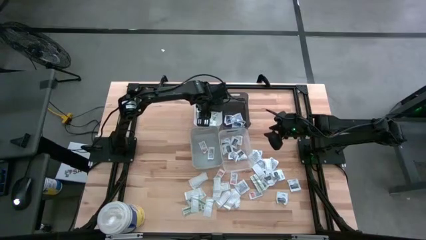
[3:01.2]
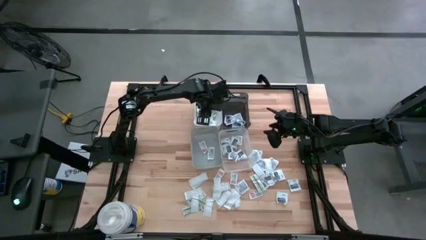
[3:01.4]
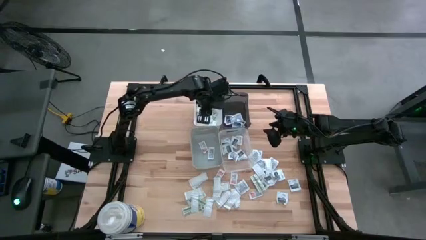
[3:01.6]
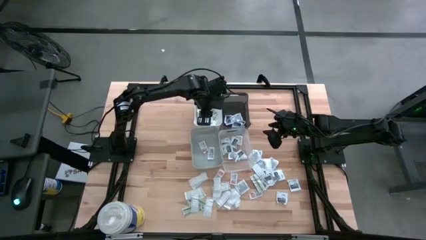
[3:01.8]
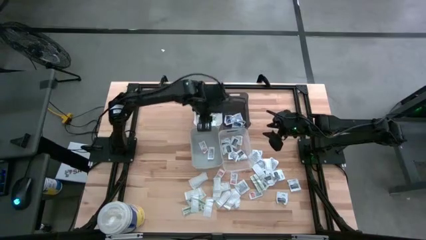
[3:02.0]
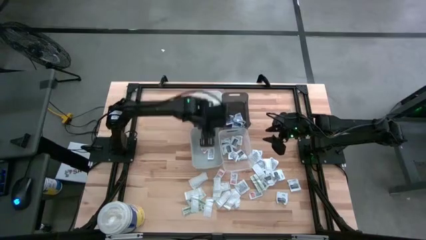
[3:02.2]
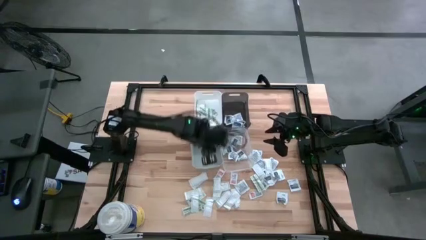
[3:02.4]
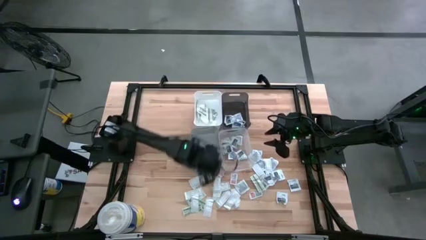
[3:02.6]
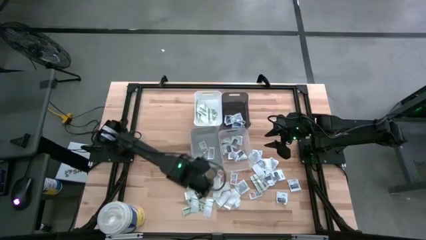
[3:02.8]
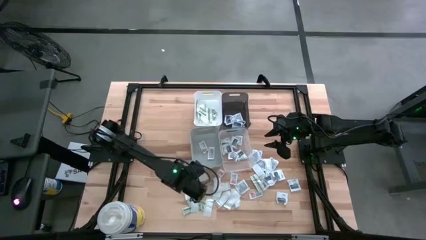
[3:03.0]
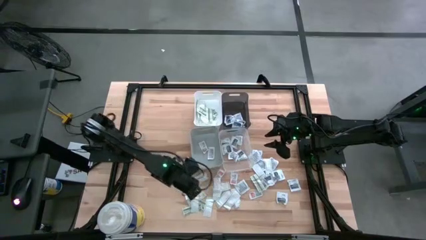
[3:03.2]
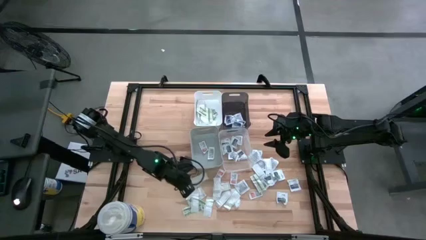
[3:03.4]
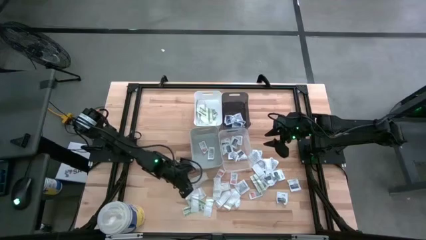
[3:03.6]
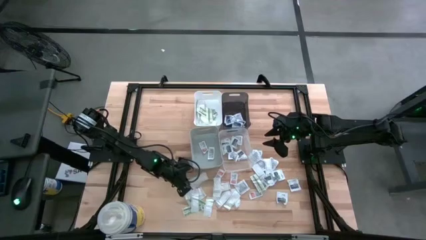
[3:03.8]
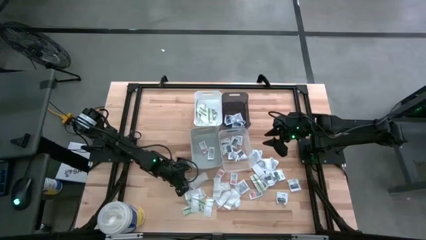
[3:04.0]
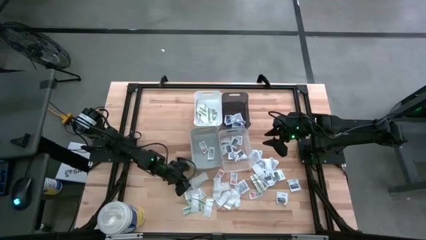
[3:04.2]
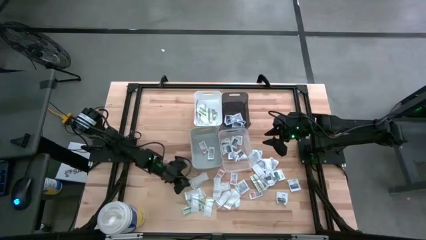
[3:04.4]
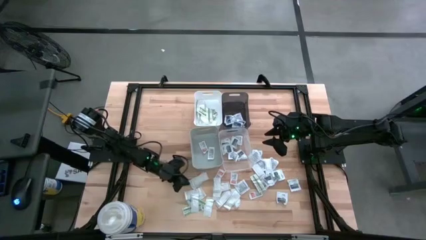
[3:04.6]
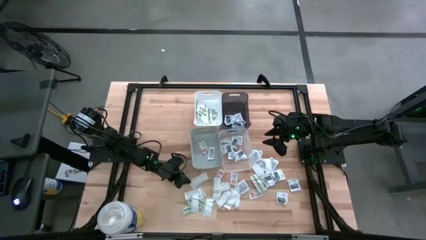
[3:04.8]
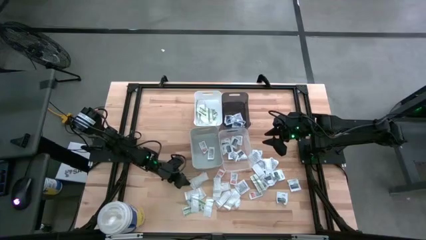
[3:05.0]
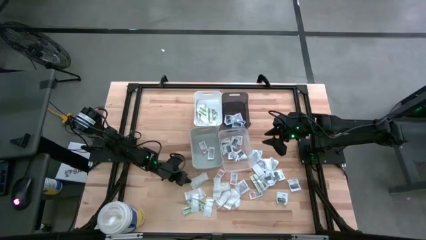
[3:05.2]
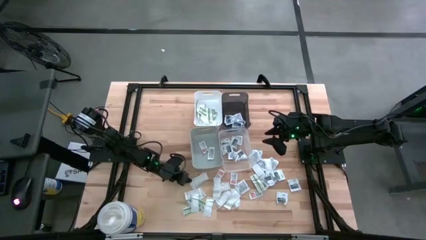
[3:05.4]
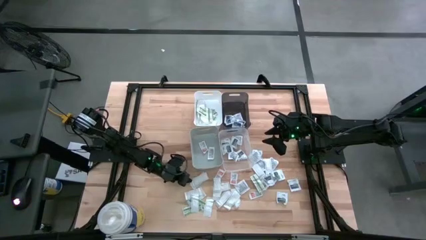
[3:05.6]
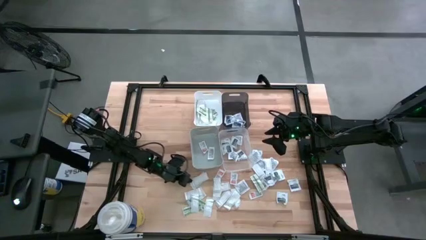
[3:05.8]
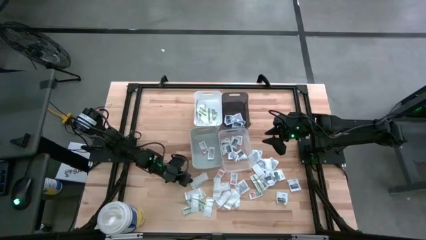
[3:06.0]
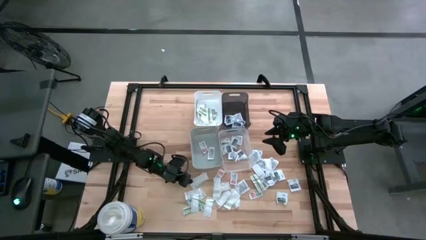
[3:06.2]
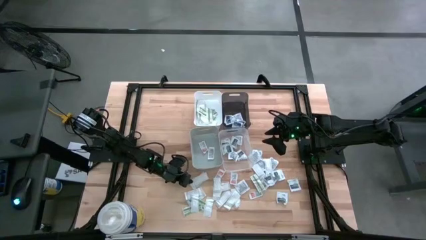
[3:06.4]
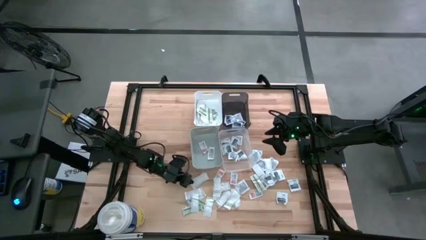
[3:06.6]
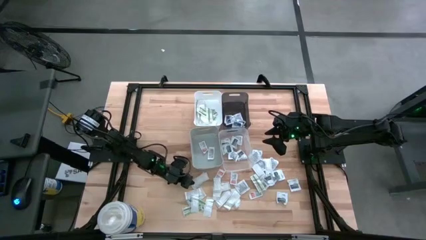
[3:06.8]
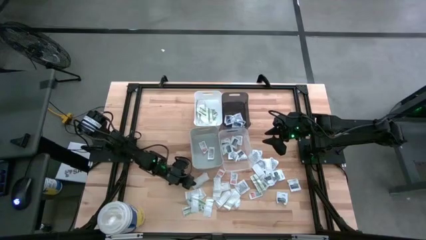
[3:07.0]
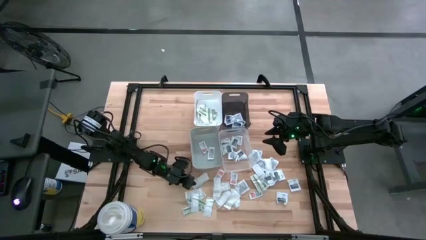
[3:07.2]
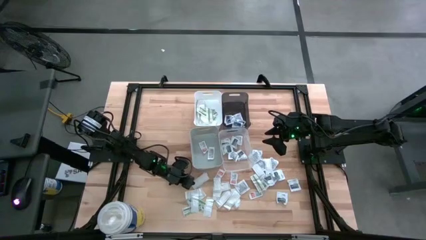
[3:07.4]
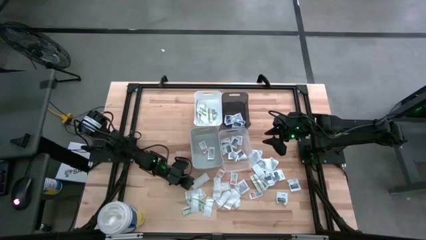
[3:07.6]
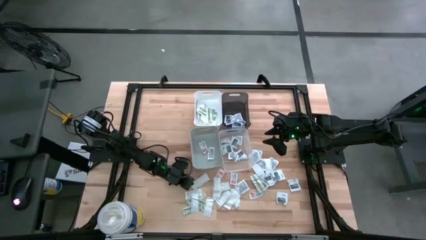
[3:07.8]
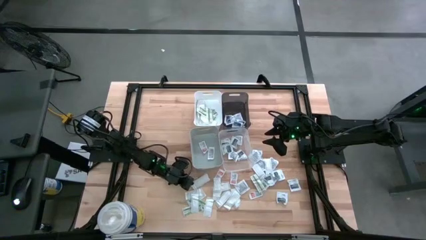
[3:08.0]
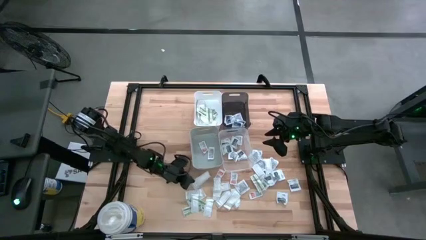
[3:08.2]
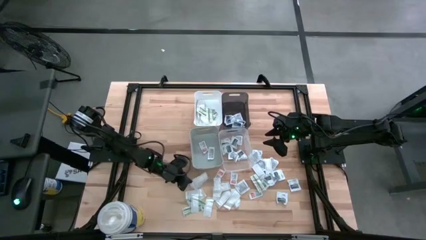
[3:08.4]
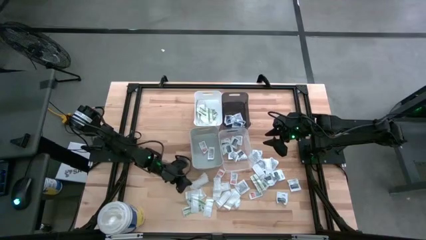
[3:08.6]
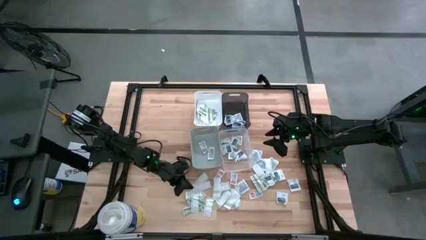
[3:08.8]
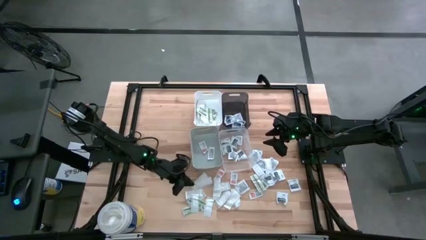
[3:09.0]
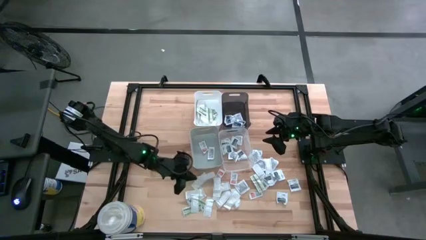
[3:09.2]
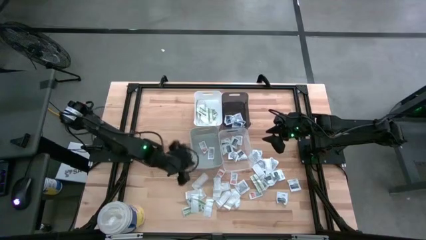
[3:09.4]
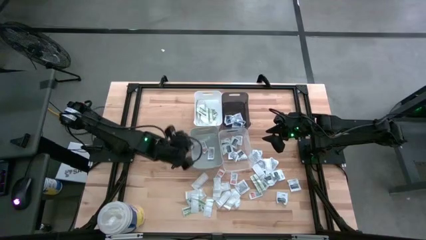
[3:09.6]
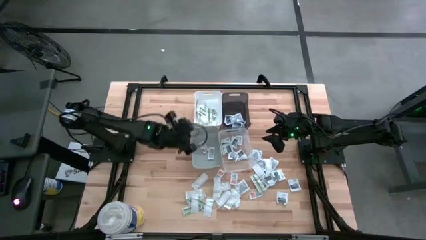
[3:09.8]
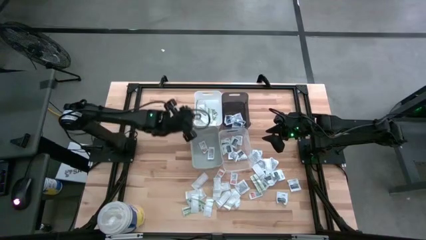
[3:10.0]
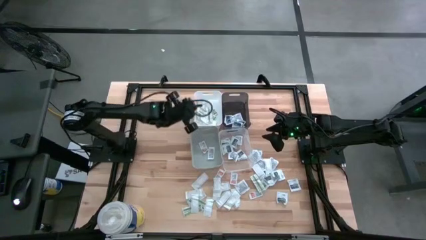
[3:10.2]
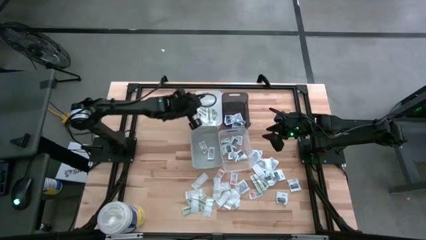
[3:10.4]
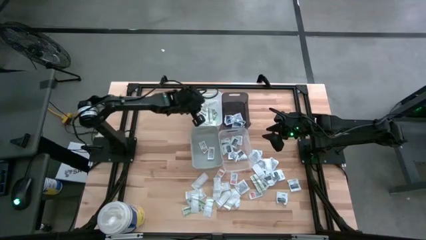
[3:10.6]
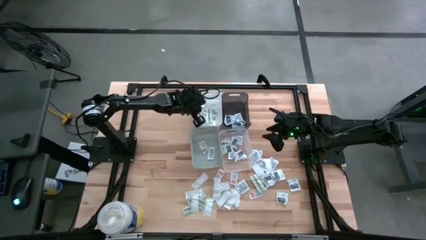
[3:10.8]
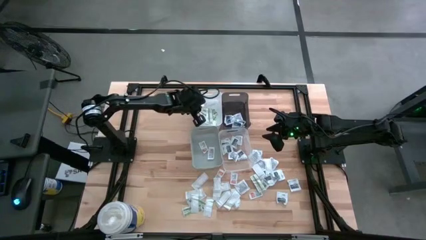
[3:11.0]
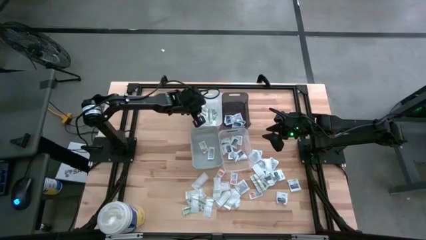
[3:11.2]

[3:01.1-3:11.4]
Task: Pick & Place First Aid Supplies
Put the green bandage pack into the white bin

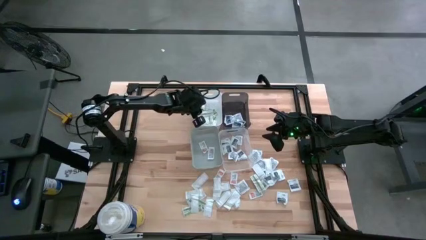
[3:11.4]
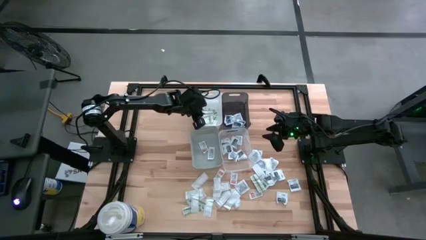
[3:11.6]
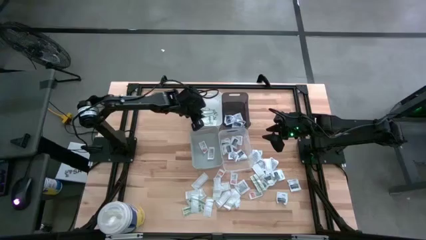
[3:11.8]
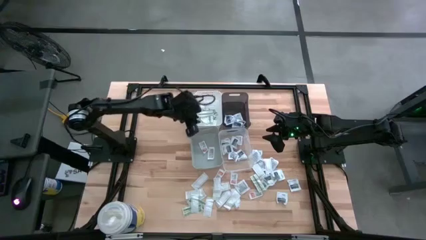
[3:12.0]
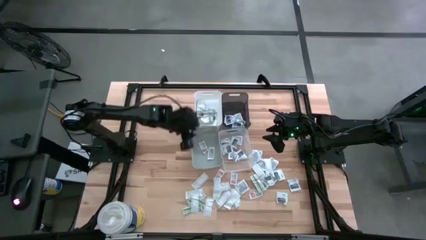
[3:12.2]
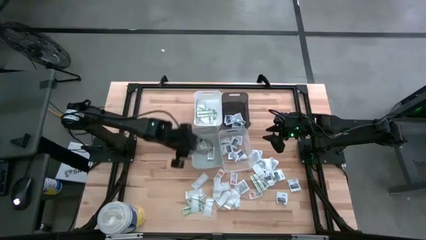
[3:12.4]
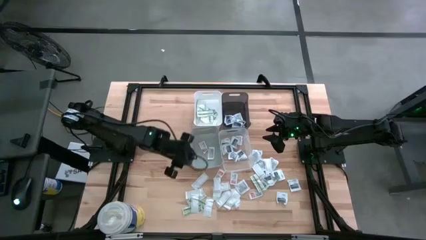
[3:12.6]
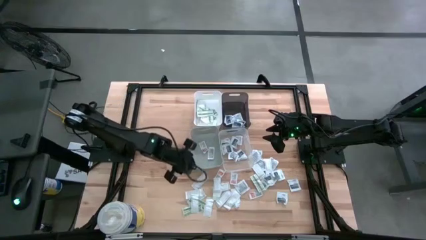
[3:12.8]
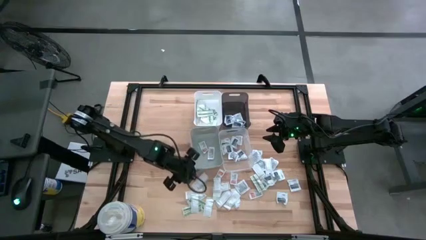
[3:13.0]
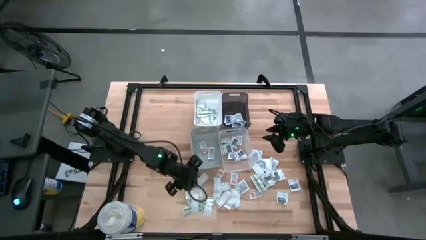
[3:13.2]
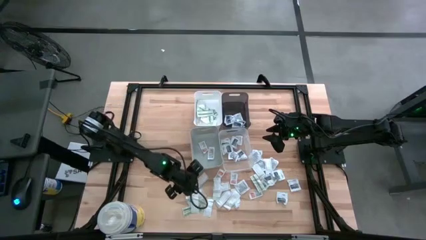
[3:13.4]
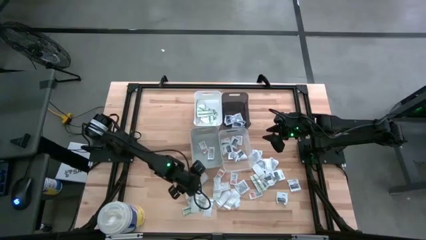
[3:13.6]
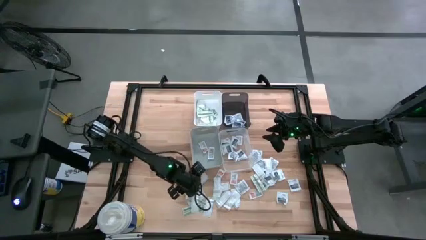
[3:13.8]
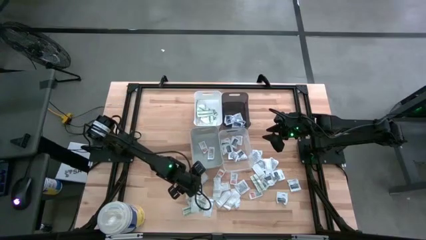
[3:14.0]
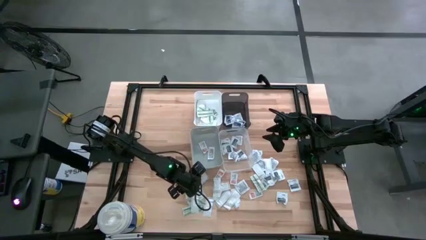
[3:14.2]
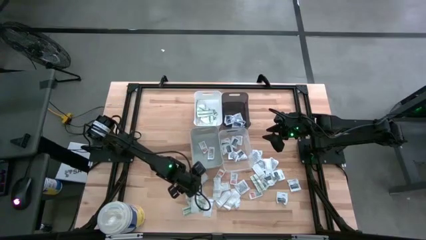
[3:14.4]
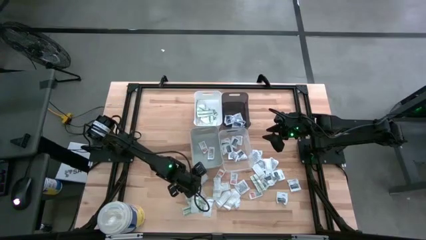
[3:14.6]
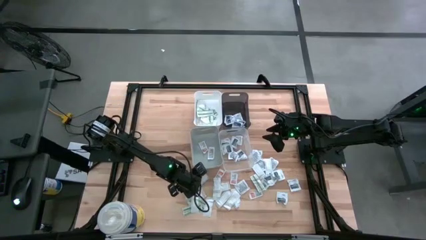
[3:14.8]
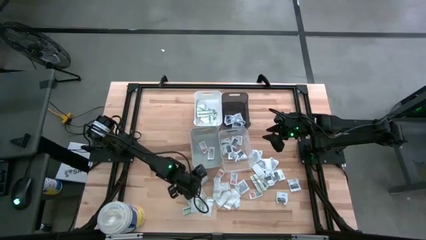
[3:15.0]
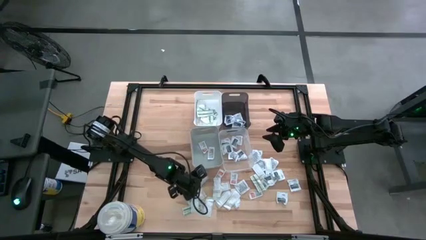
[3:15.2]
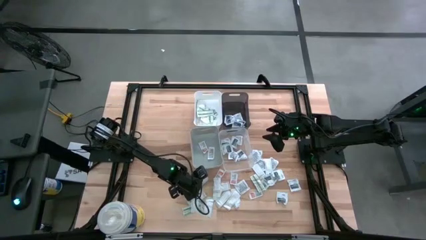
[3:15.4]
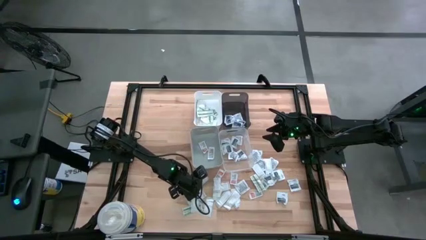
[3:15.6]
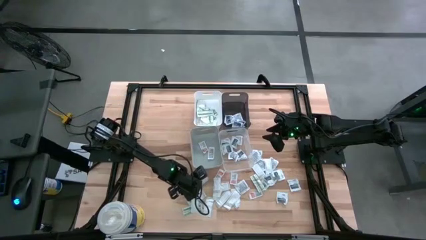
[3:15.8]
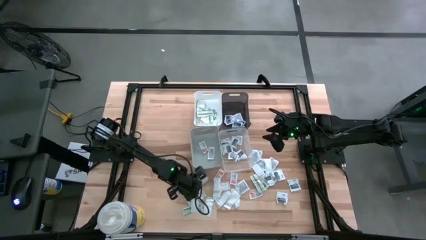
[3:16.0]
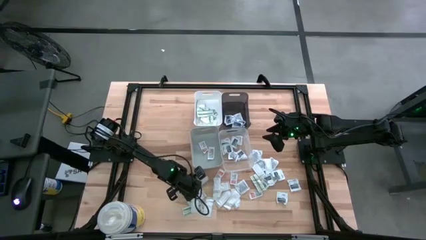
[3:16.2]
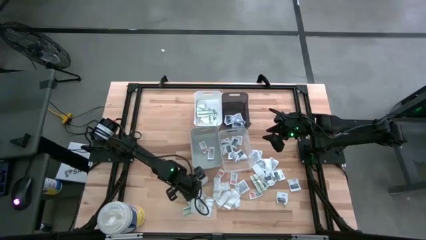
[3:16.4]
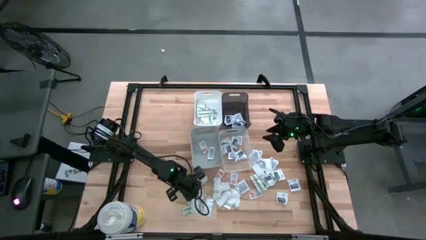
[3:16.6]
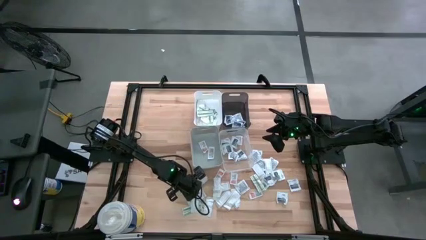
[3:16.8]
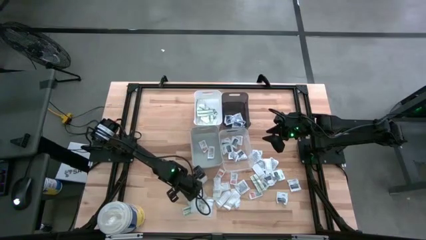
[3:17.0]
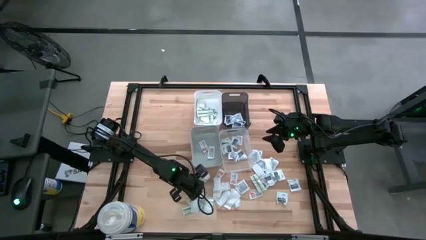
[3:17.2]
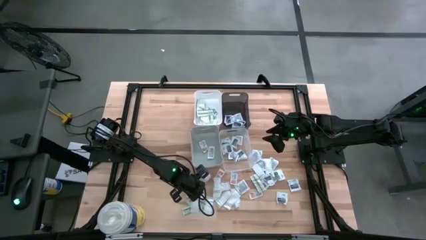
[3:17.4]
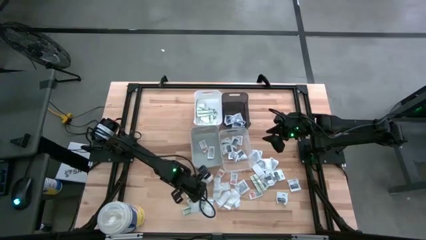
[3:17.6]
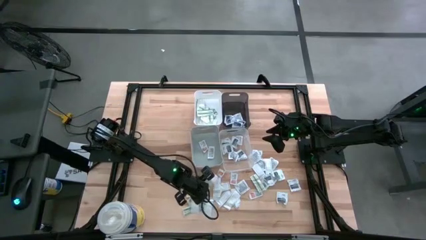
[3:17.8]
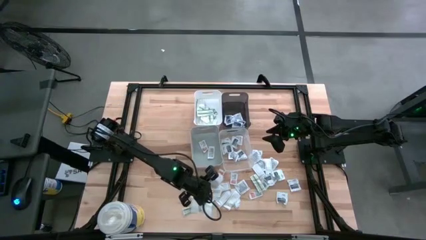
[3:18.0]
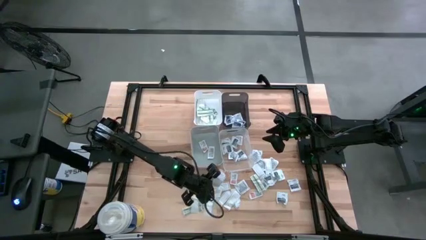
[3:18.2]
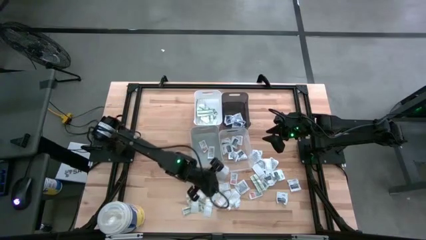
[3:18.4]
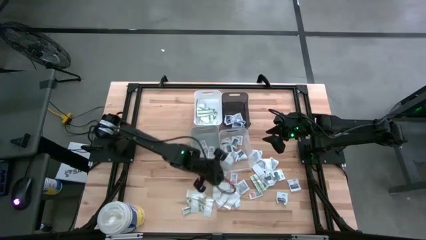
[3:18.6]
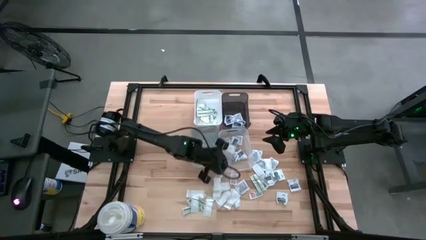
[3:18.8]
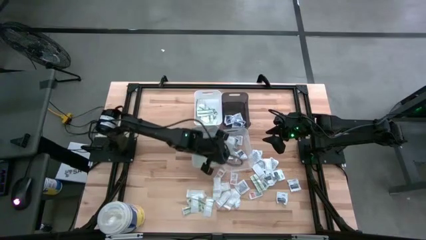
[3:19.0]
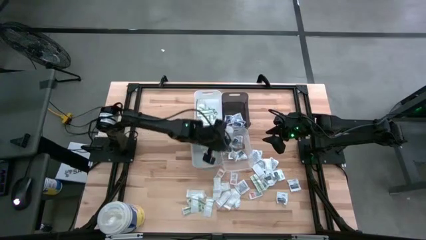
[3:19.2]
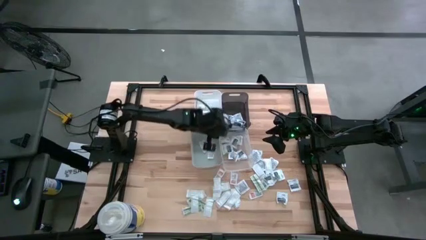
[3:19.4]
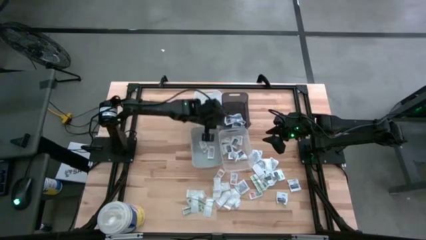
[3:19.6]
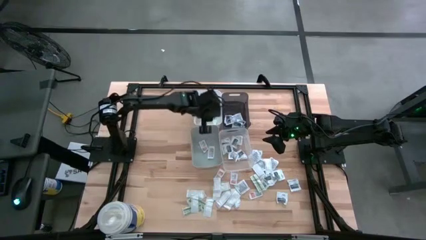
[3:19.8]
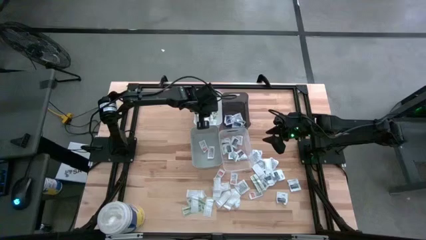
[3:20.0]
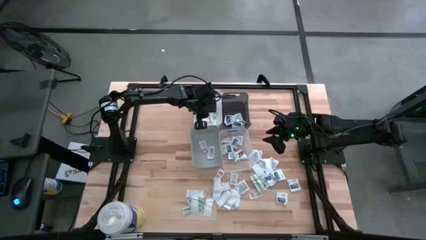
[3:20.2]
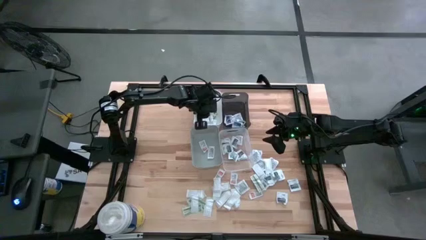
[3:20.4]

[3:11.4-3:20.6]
Put the green bandage pack into the white bin
